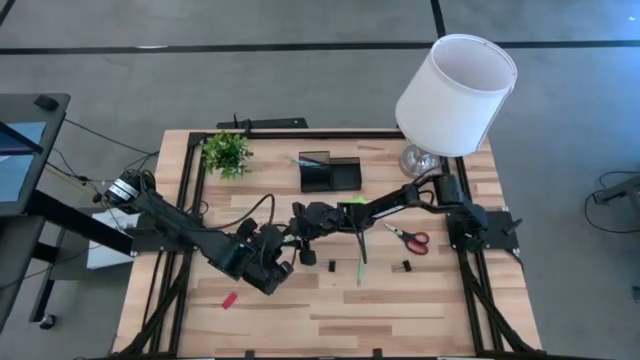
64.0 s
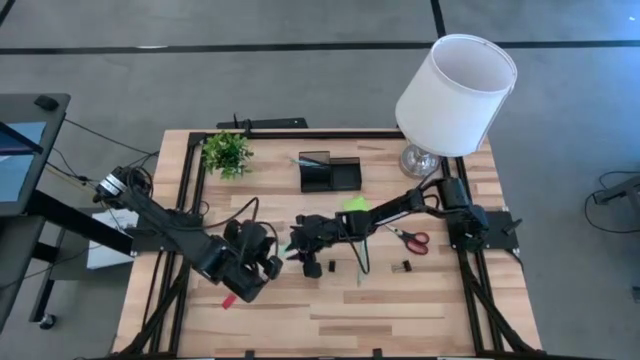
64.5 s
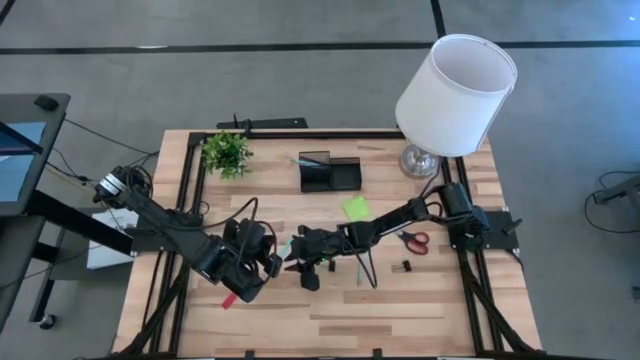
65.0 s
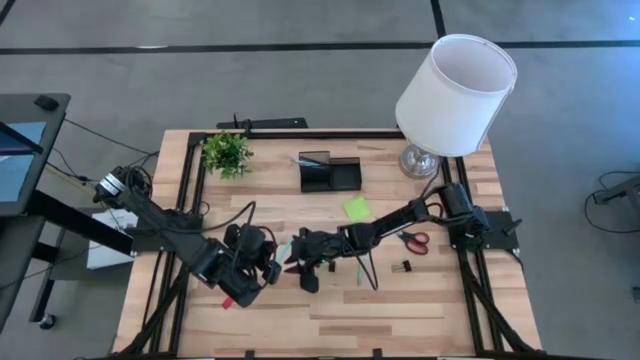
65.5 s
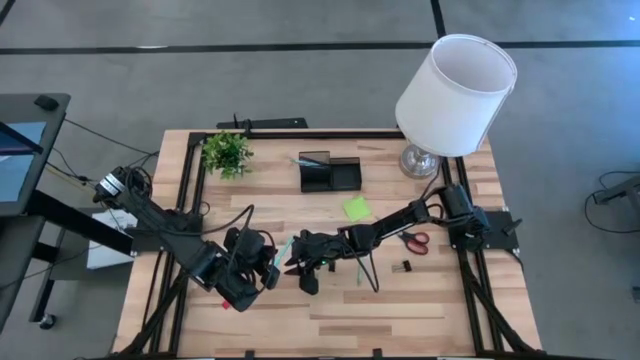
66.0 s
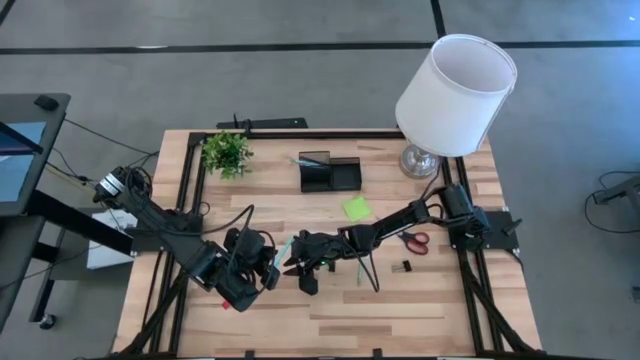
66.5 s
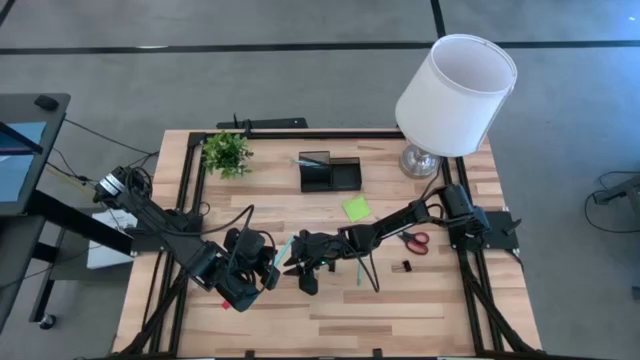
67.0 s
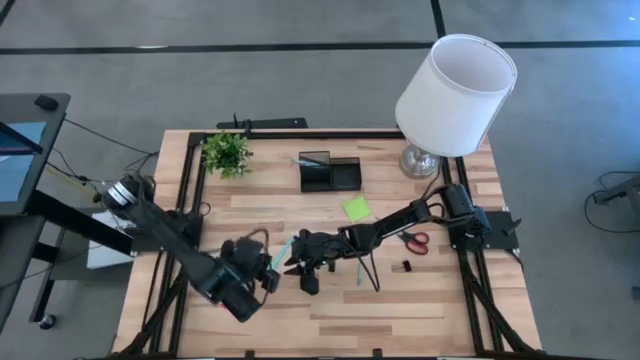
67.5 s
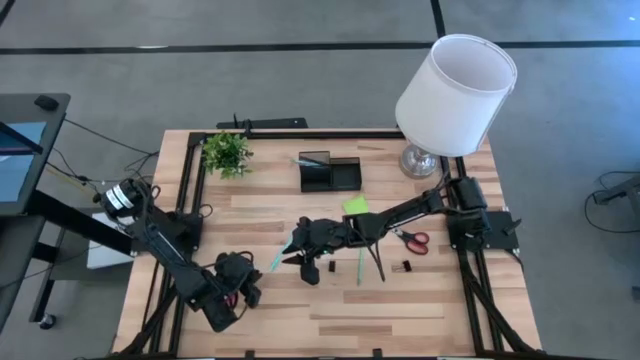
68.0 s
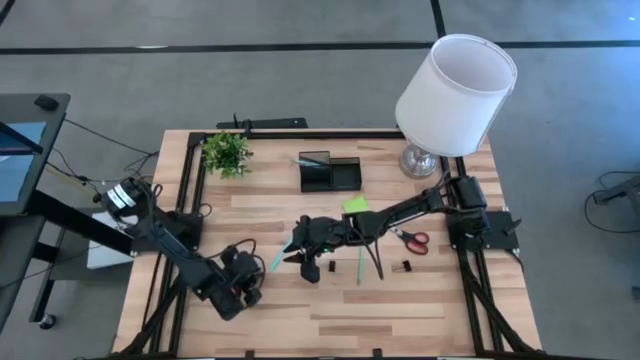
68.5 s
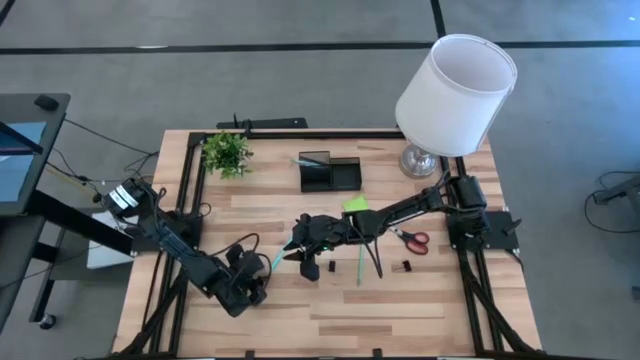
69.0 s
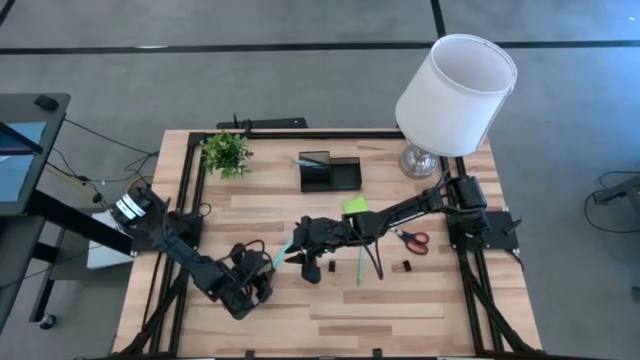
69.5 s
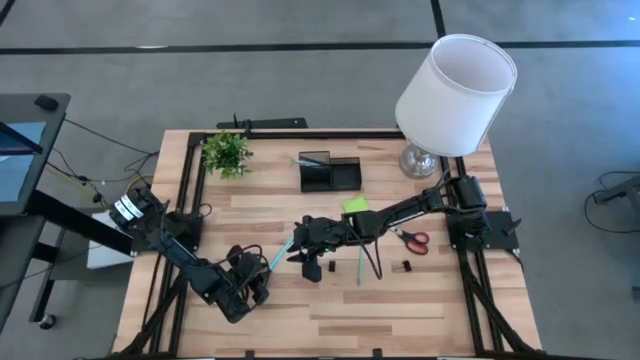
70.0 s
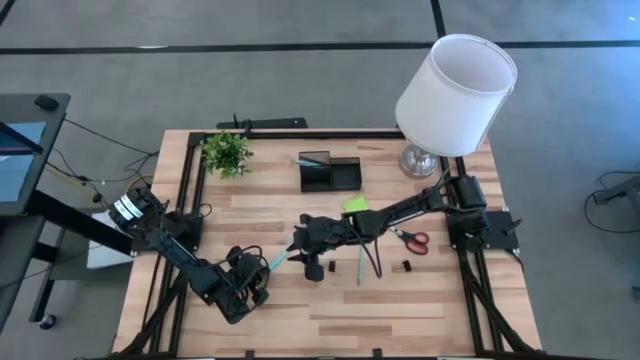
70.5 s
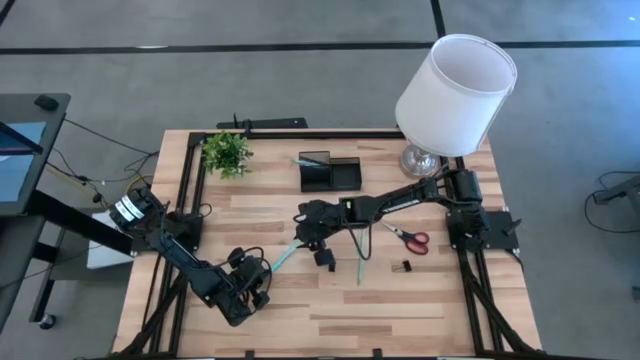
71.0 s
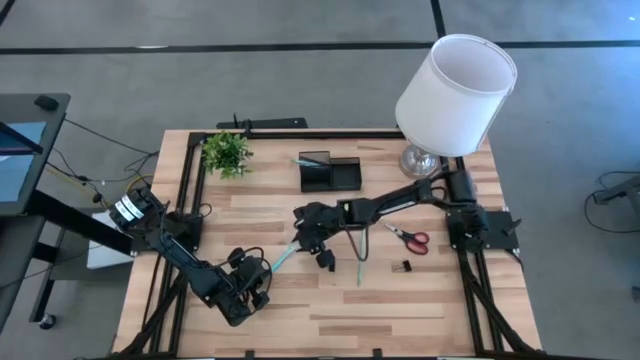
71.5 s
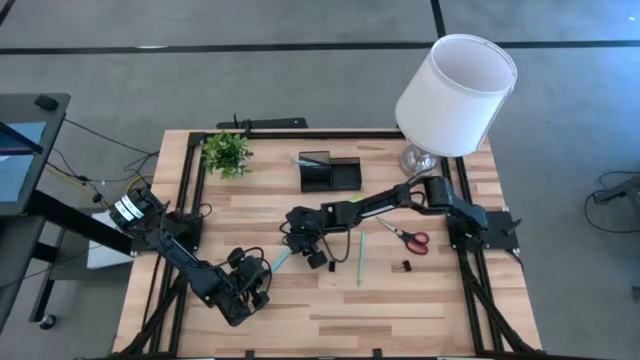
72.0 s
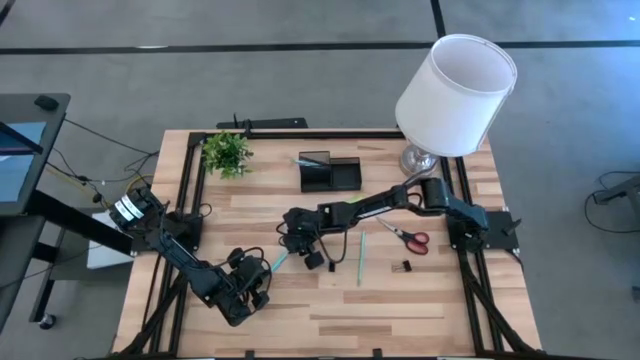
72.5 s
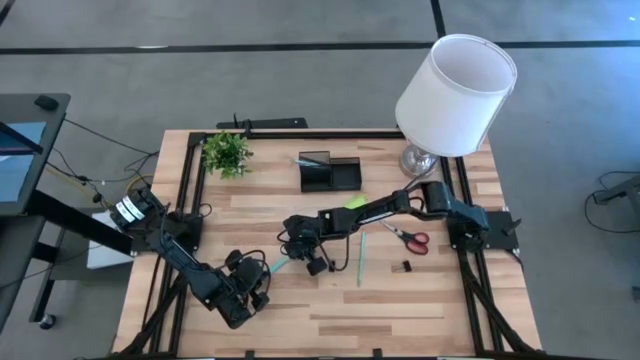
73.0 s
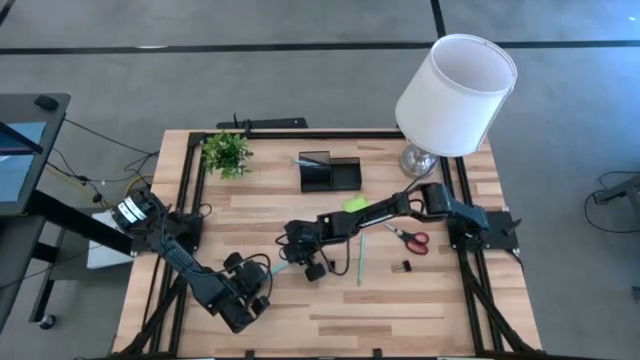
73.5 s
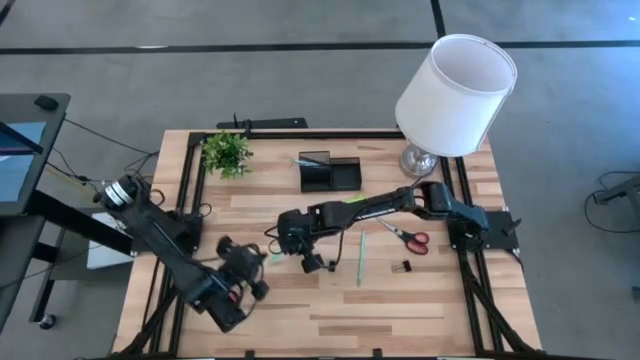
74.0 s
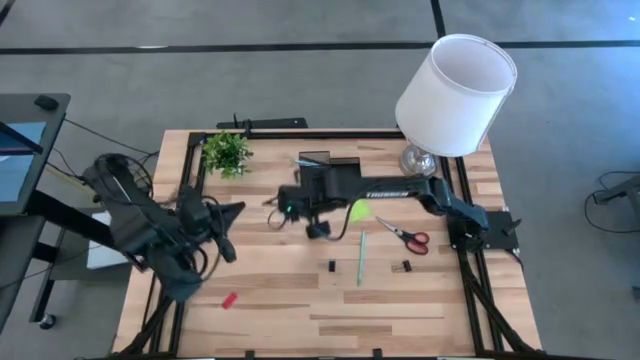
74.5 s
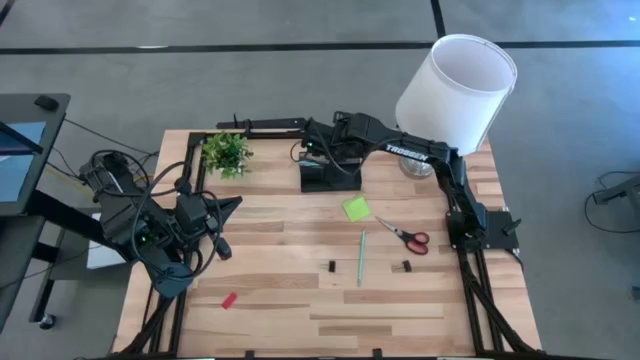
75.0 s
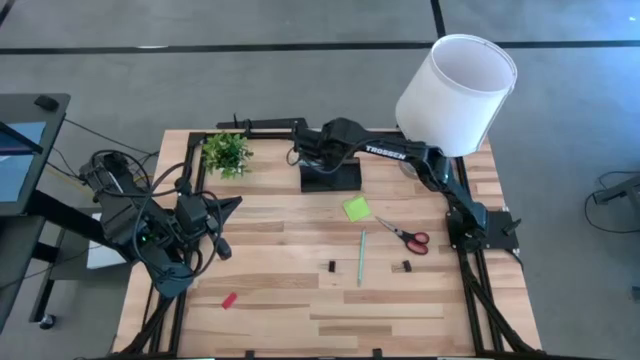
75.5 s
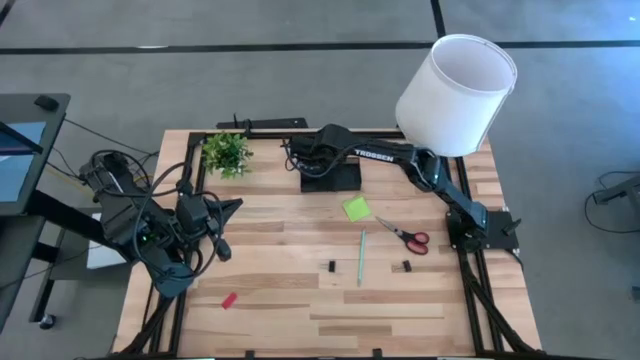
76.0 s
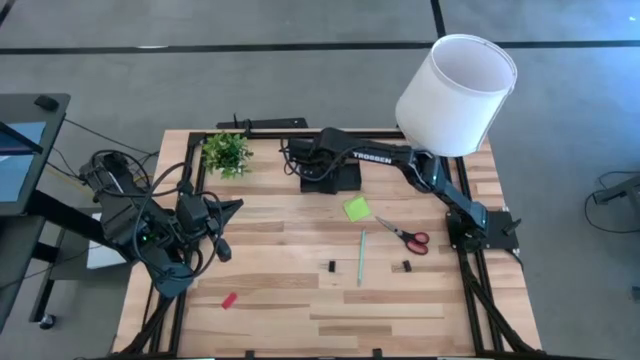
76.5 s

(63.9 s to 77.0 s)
Task: Pick and place office supplies into organizer
Put the blue pen into the black desk organizer

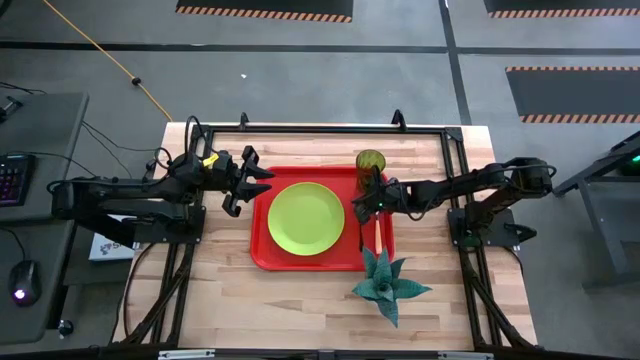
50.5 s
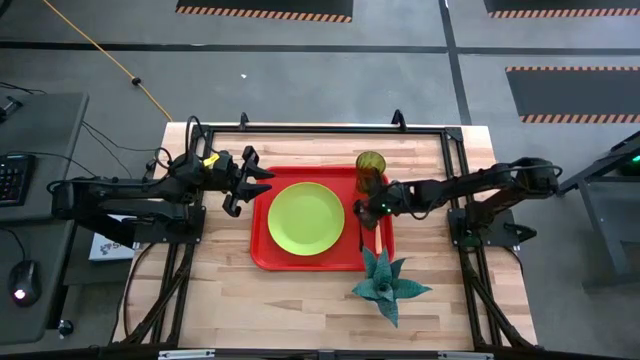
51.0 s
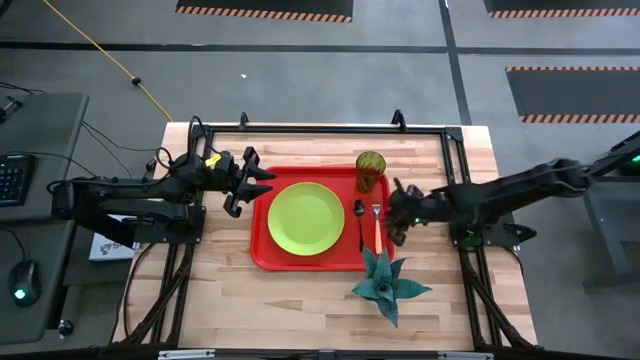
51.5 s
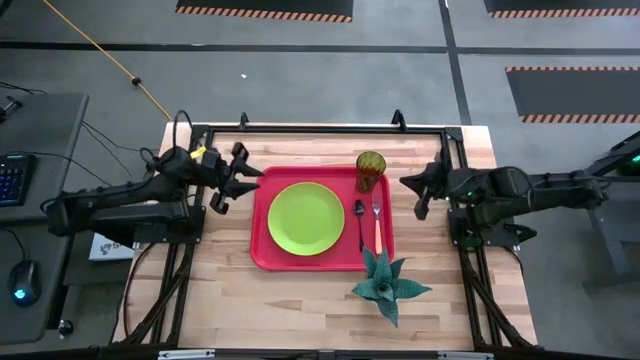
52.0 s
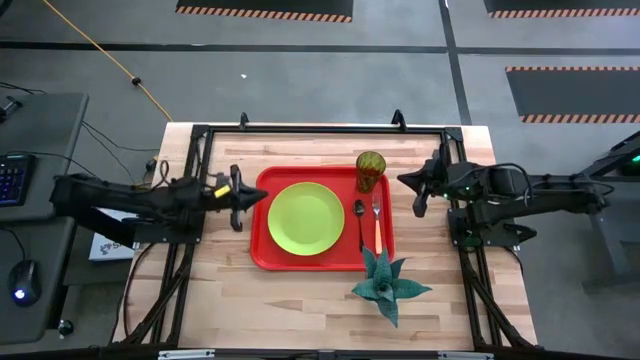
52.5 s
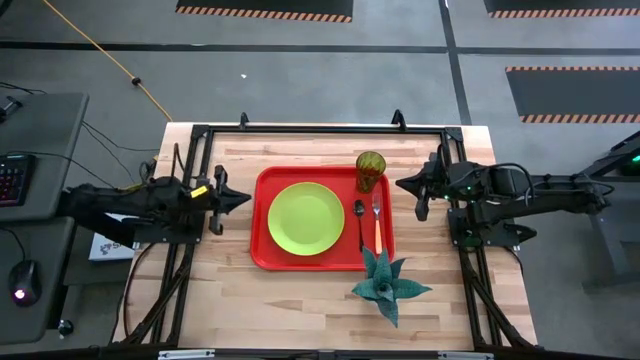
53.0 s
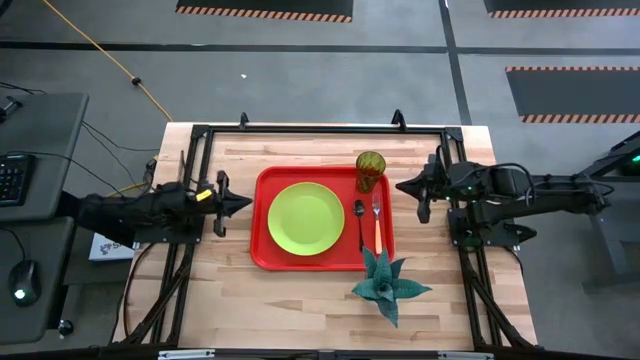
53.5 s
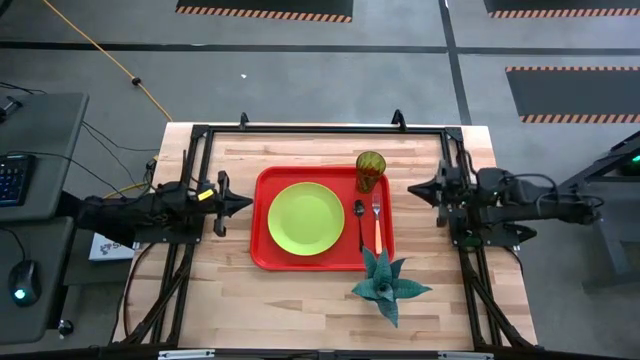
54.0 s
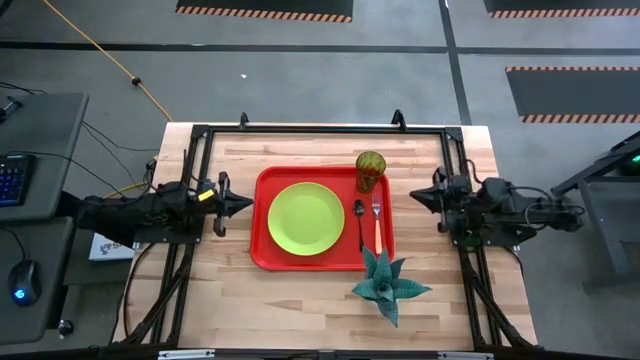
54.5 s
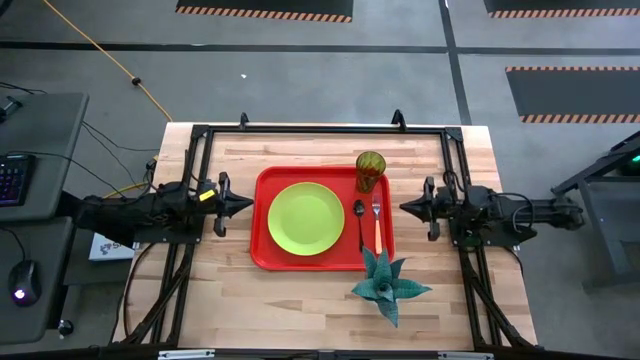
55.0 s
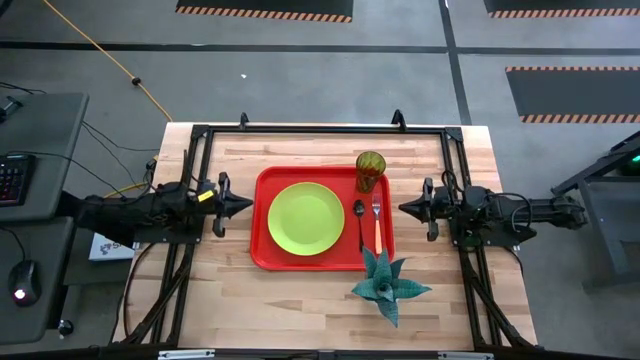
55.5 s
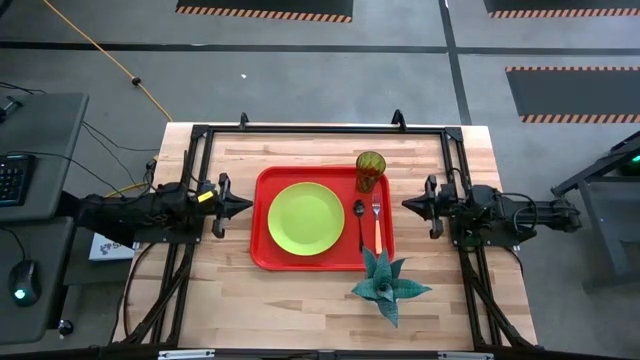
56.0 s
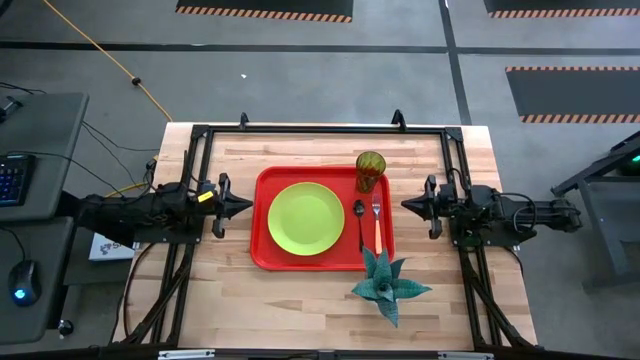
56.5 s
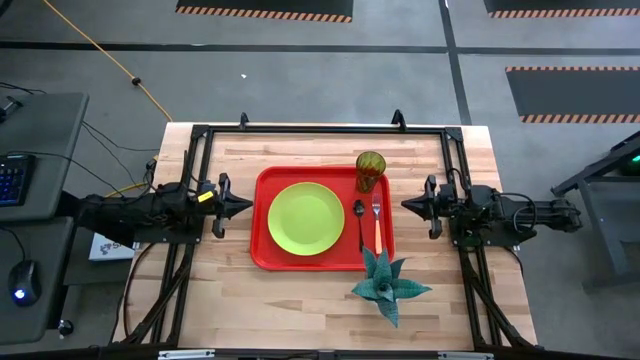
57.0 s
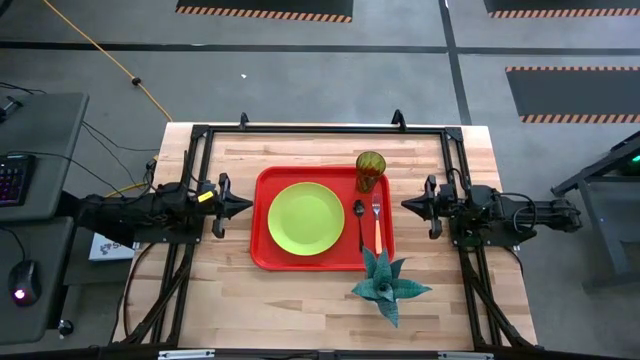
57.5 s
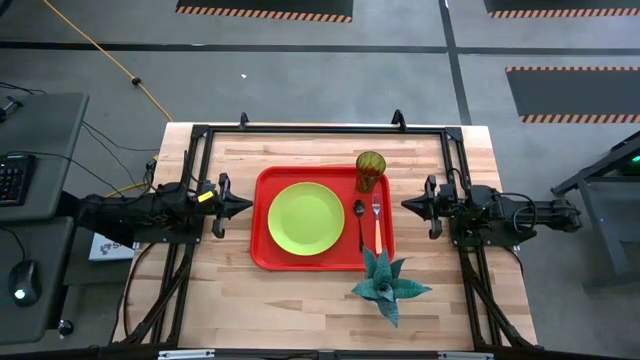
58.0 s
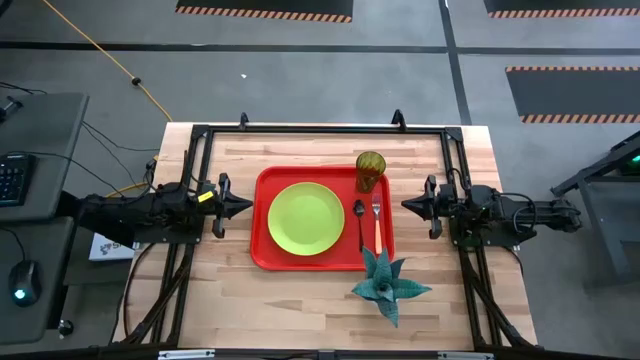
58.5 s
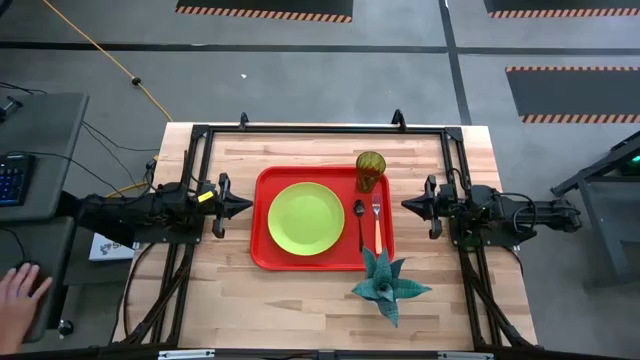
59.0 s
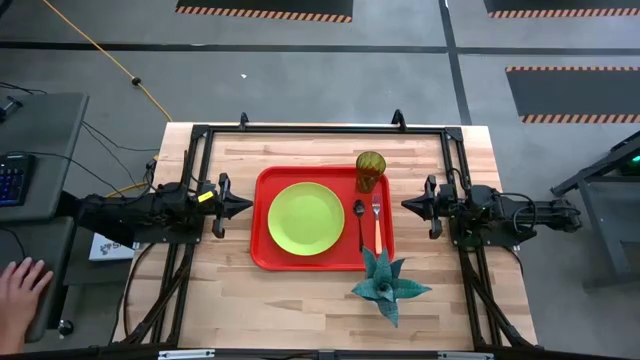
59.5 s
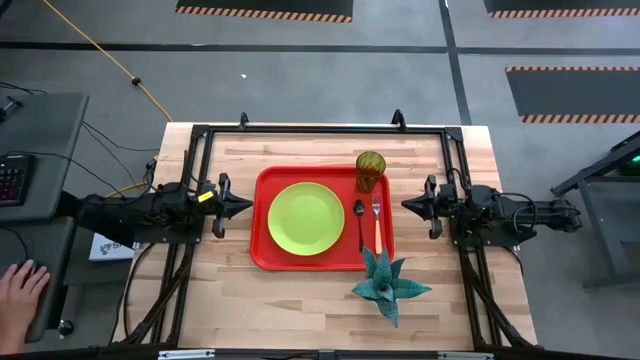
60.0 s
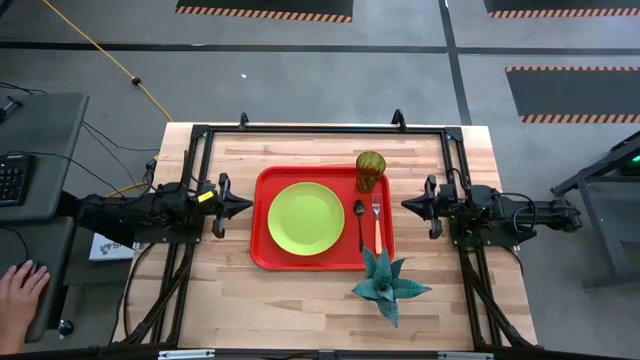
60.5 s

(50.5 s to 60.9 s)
Task: Pick and place plate/cup/fork/spoon on tray
Return to Home Position
